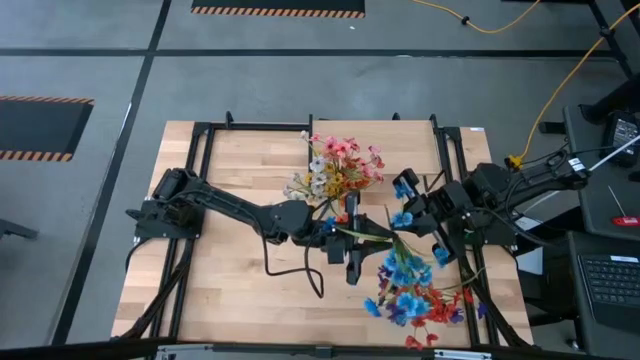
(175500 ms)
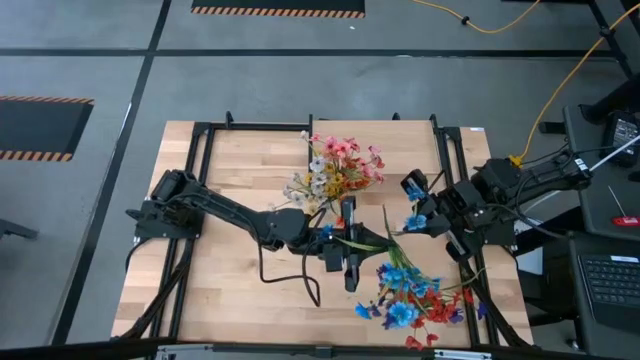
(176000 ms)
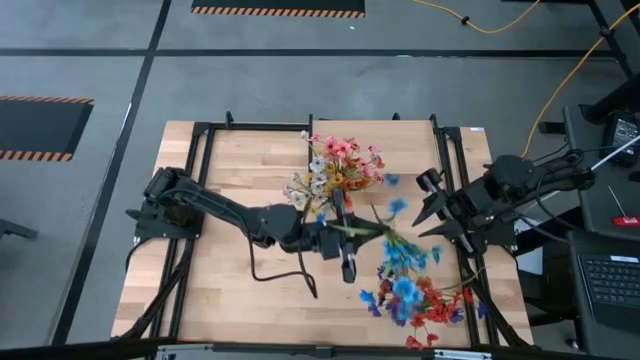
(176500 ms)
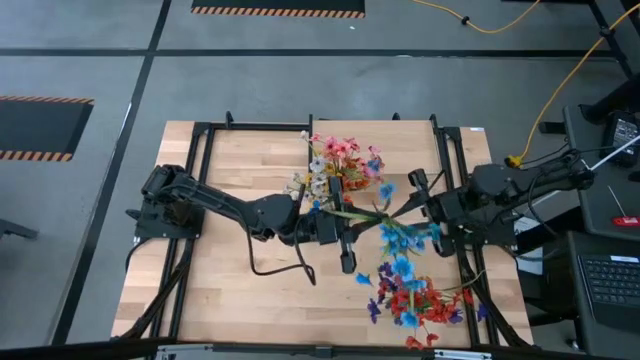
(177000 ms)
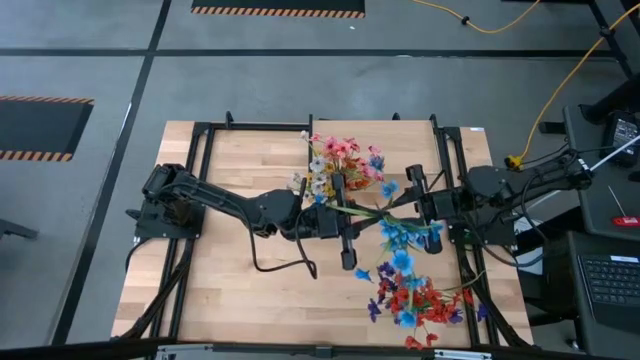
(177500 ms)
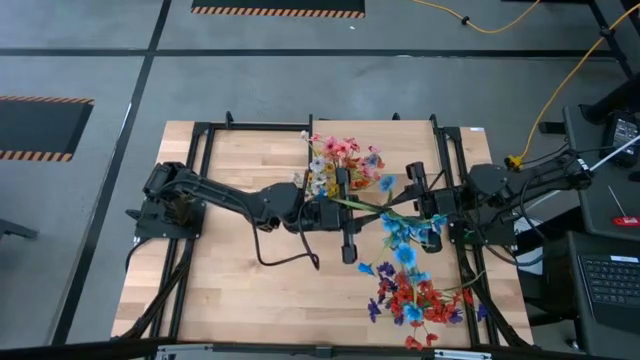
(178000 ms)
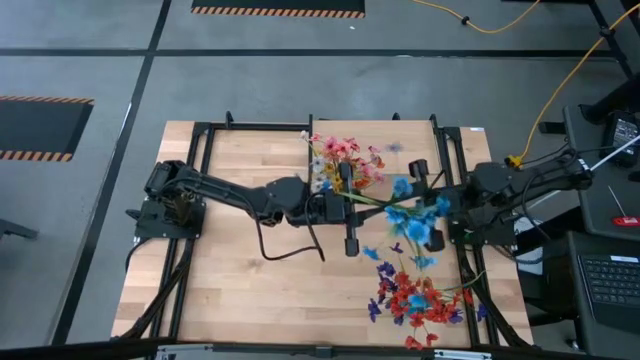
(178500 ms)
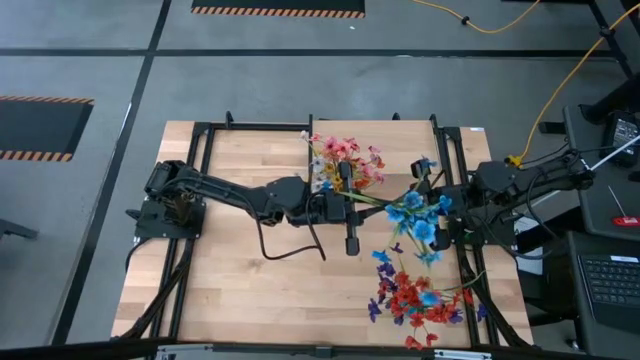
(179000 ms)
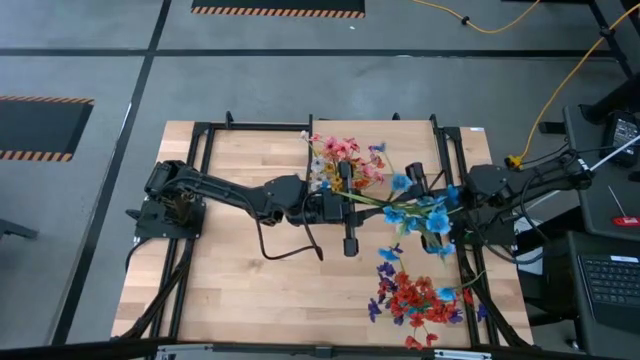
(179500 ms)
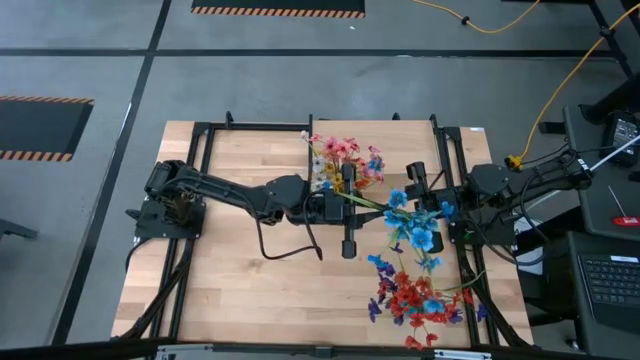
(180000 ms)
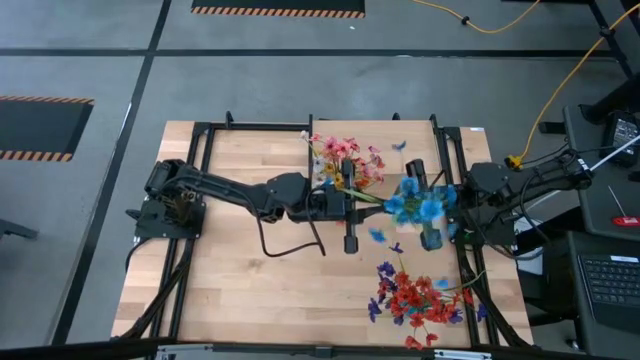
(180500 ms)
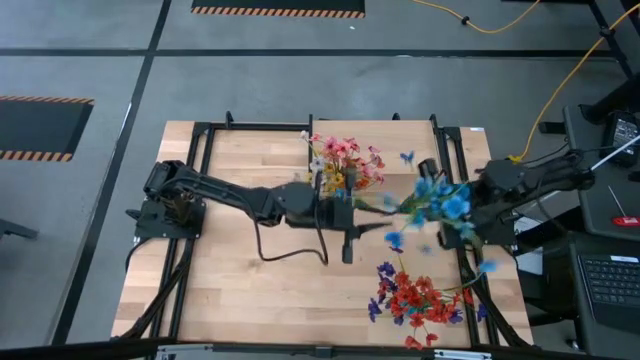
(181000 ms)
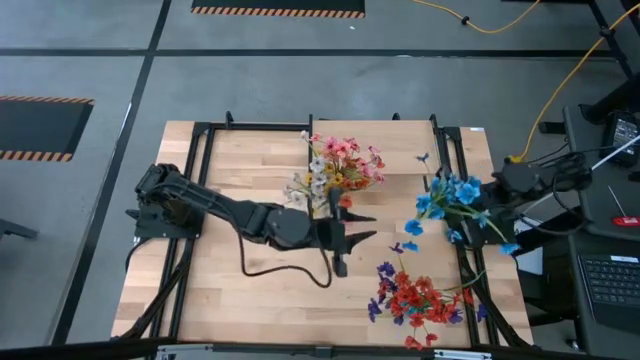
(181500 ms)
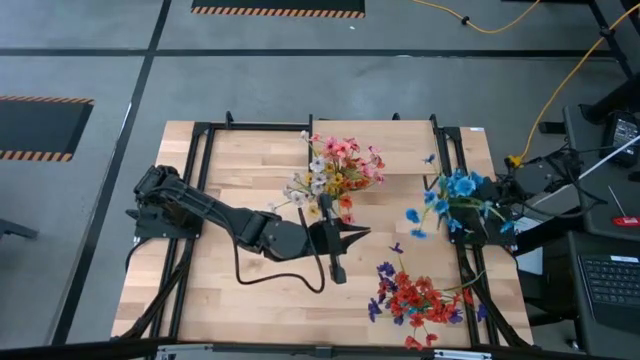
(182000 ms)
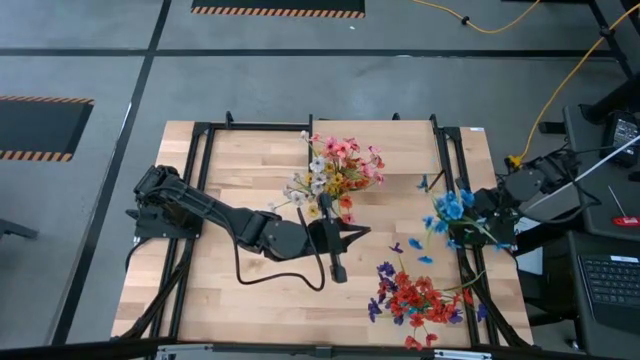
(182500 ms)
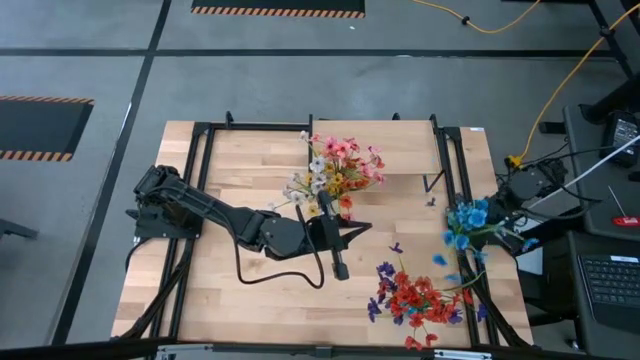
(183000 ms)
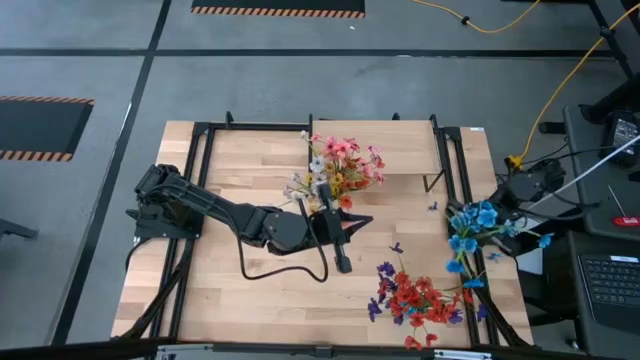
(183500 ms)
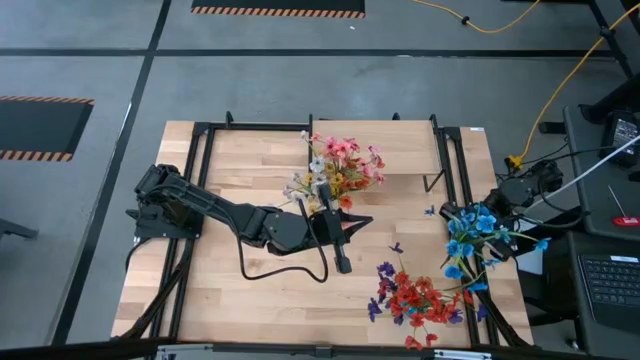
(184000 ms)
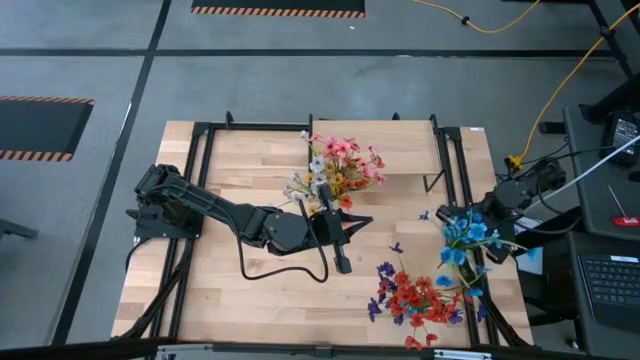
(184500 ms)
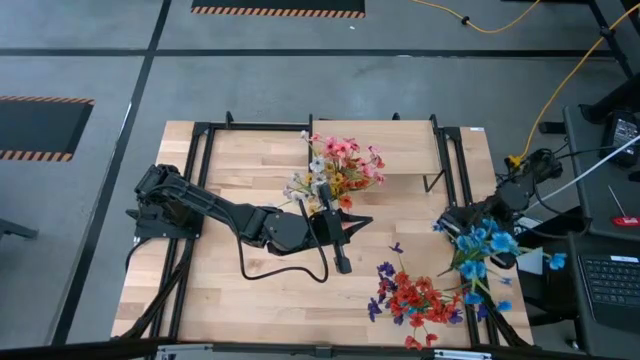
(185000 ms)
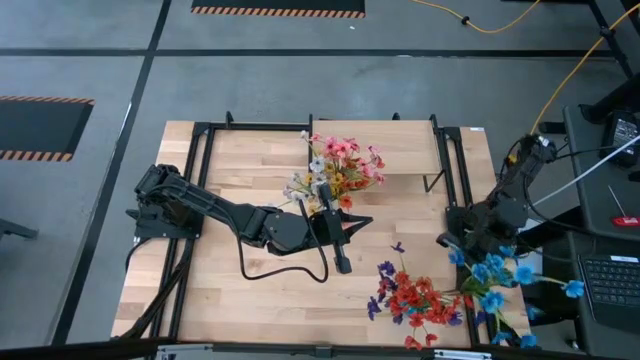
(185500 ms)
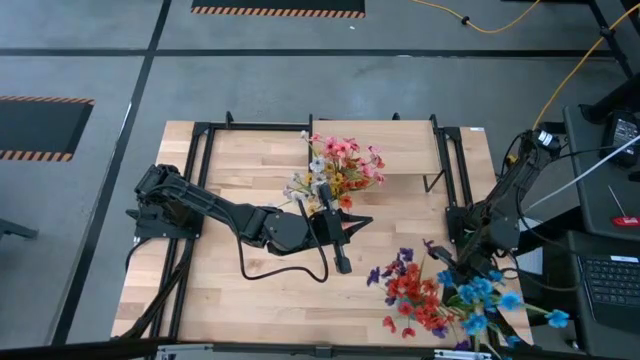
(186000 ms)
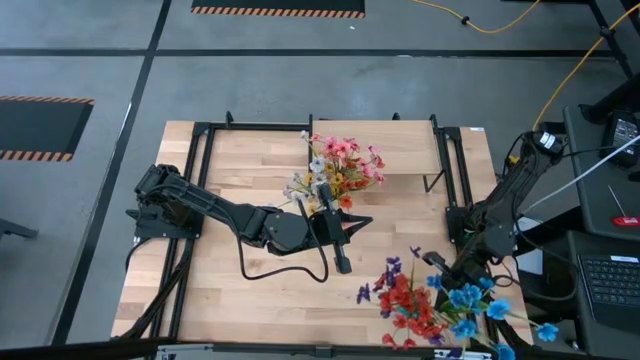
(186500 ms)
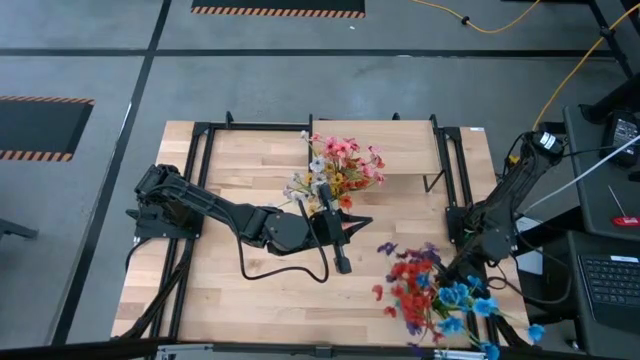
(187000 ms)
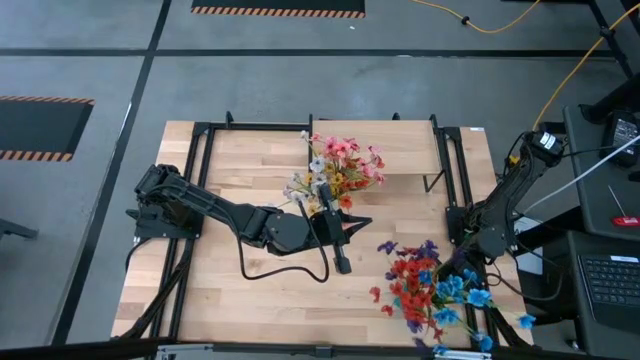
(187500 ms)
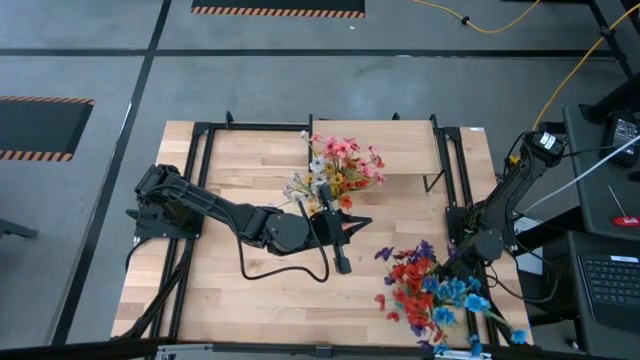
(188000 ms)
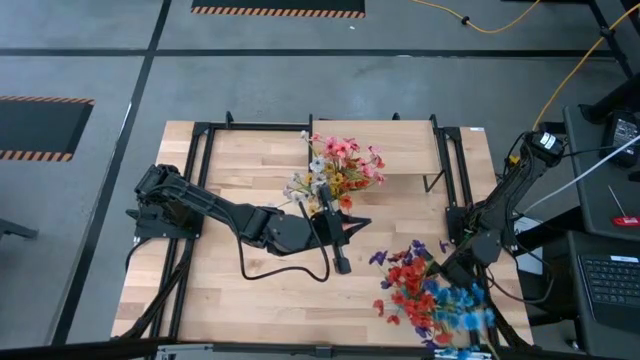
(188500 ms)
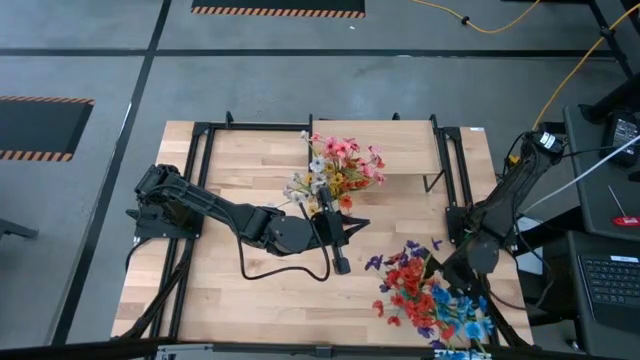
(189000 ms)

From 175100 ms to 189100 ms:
Task: Pick and place flowers into a vace then onto a shelf
Put the blue flowers into the blue vase

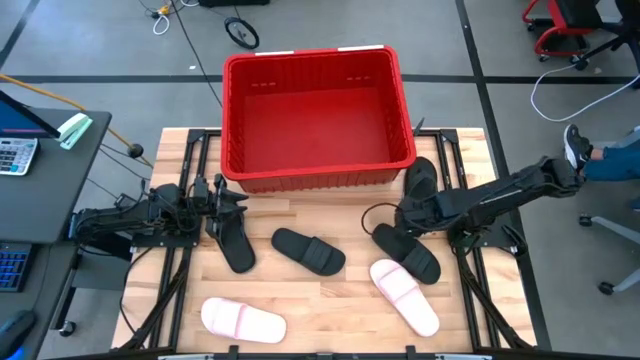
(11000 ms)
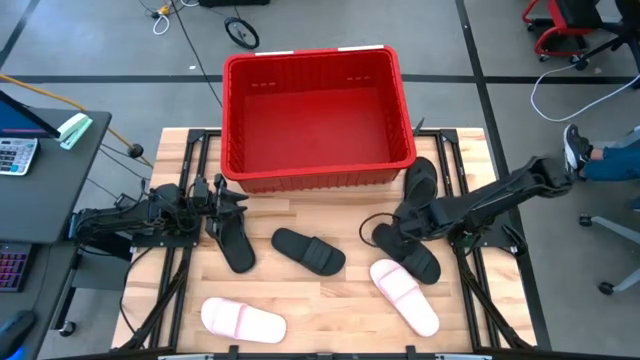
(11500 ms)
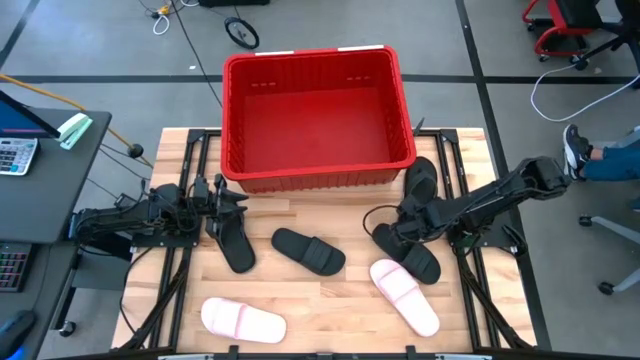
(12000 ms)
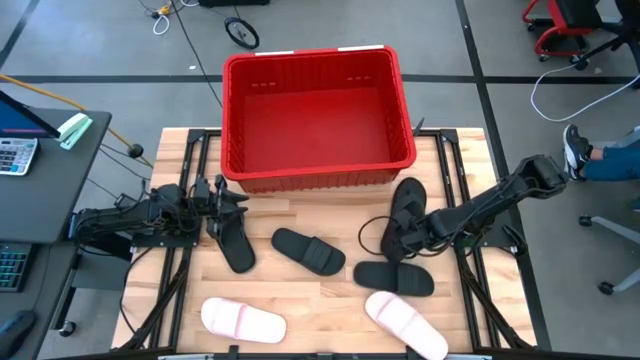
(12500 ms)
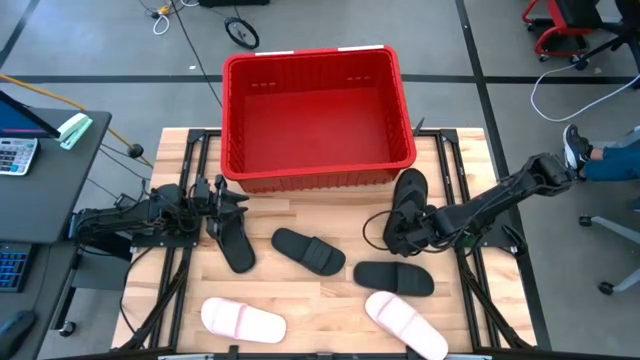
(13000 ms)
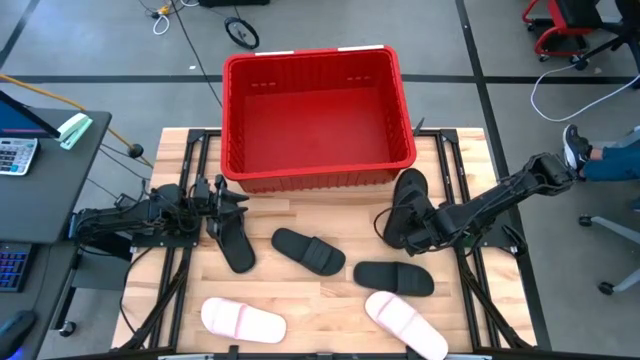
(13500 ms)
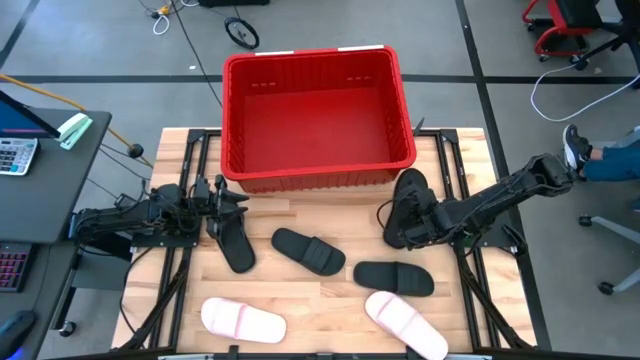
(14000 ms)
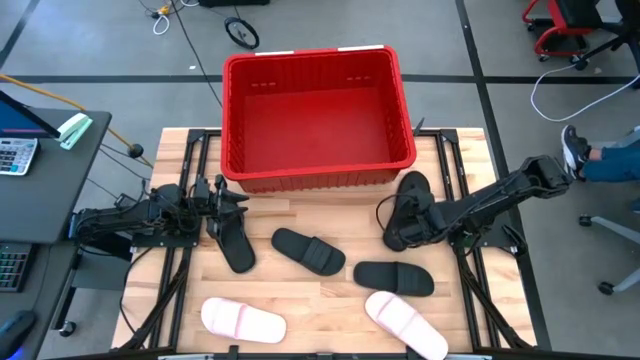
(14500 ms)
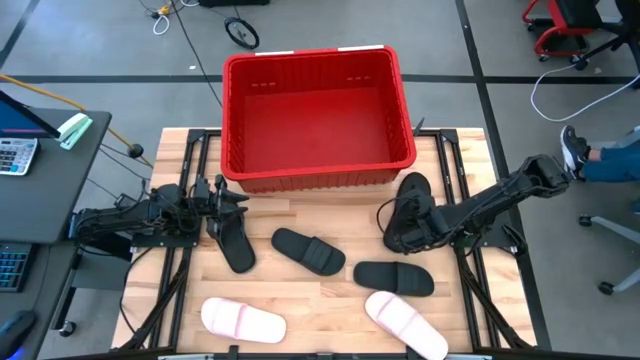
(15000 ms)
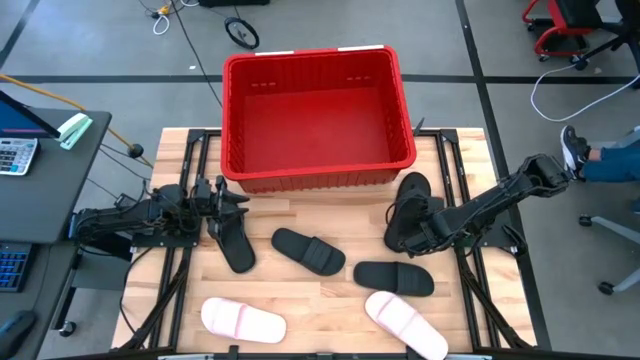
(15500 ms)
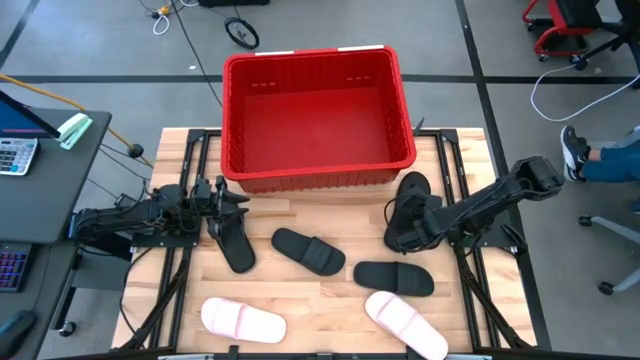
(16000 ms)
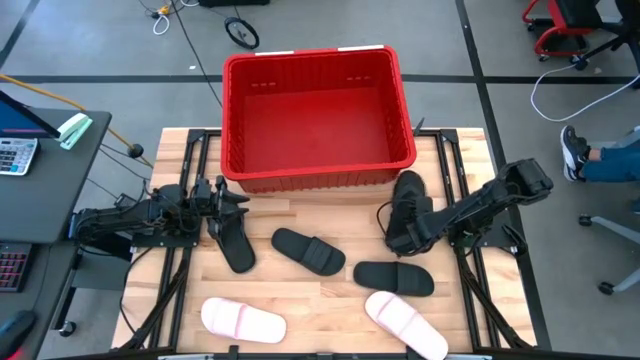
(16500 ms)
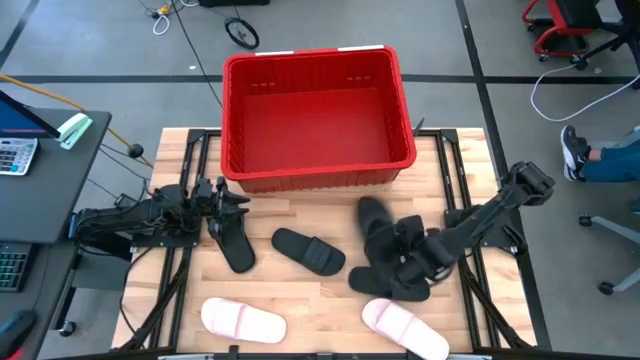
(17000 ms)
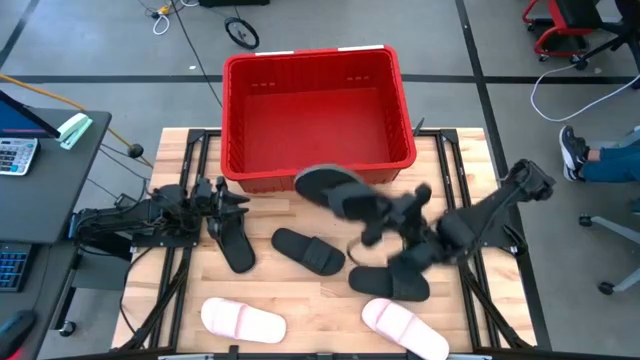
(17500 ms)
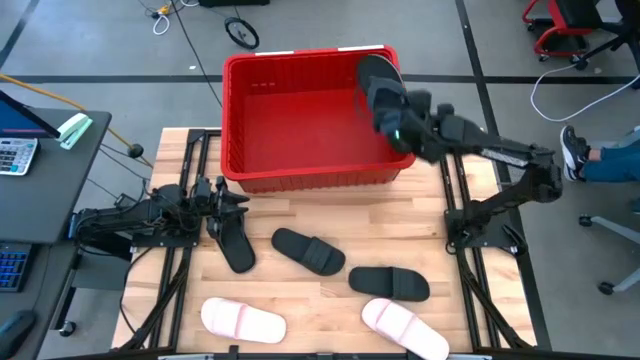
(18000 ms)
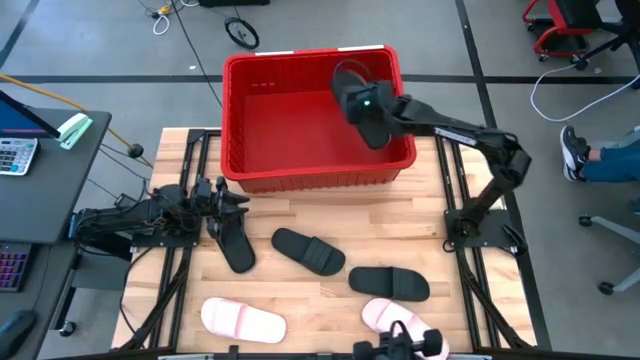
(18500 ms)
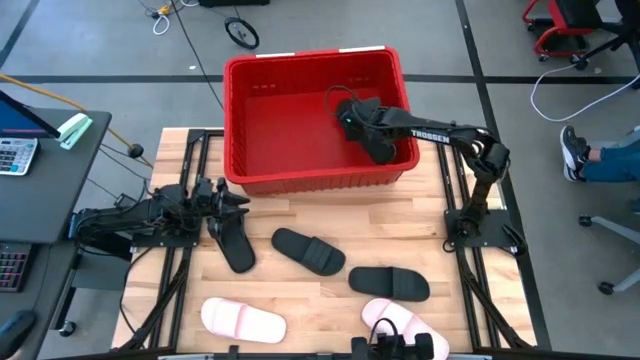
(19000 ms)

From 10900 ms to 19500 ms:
Task: Pick and place slides into bin
Put the right pair of black slippers into the red container
